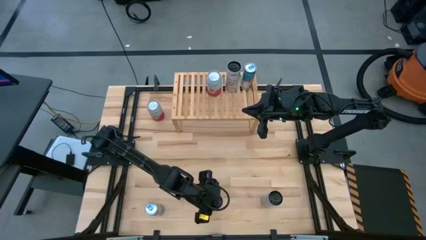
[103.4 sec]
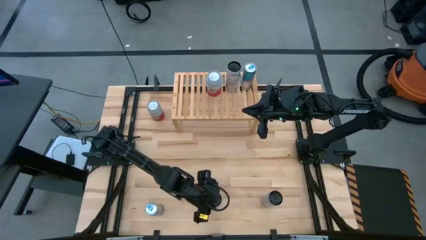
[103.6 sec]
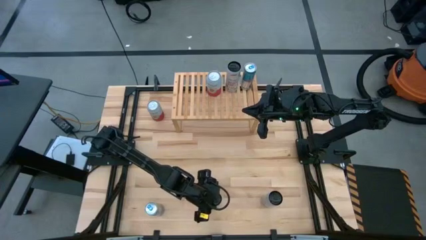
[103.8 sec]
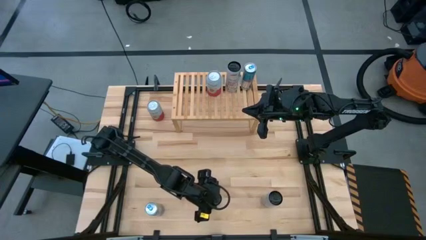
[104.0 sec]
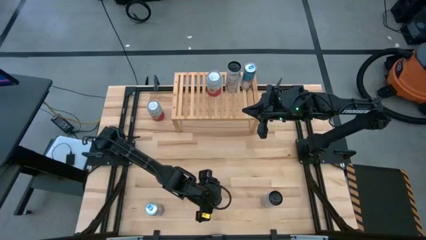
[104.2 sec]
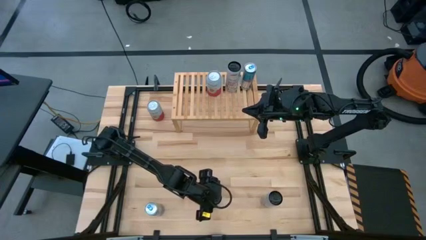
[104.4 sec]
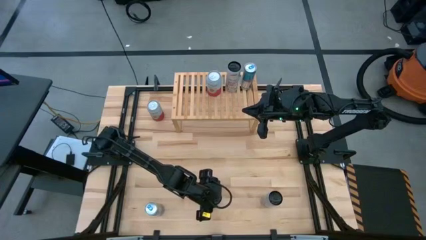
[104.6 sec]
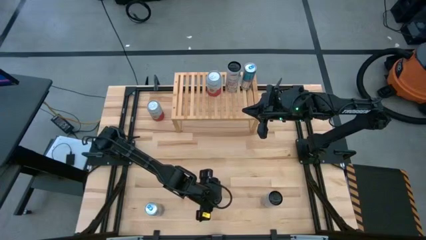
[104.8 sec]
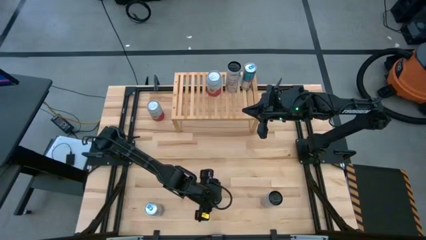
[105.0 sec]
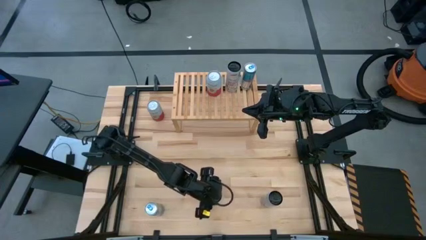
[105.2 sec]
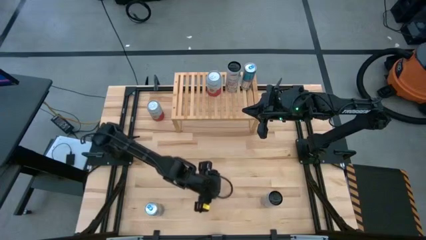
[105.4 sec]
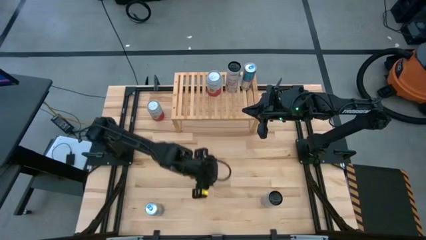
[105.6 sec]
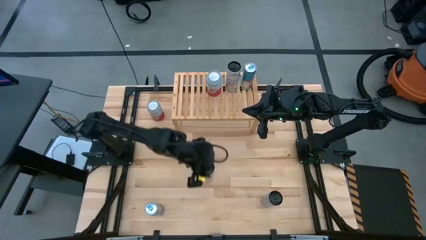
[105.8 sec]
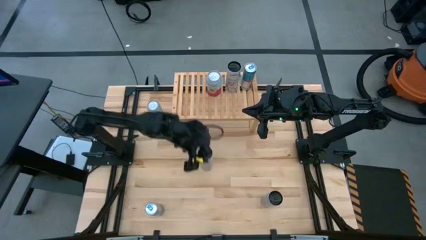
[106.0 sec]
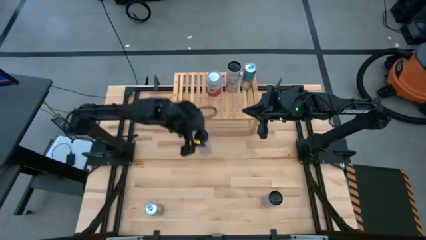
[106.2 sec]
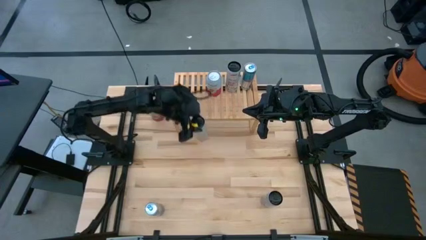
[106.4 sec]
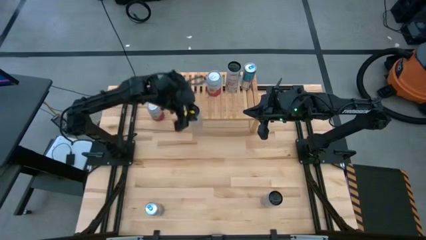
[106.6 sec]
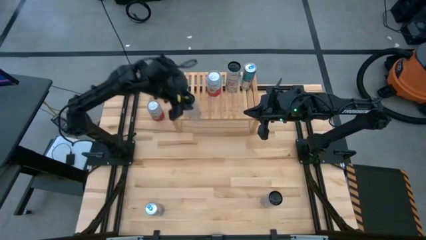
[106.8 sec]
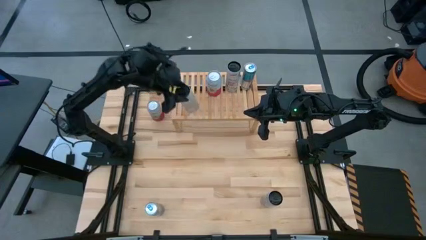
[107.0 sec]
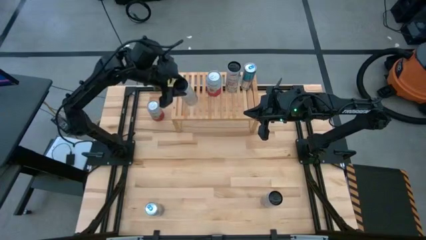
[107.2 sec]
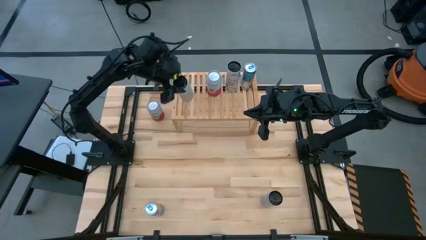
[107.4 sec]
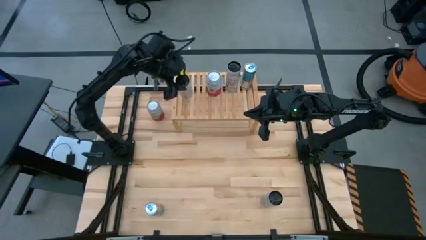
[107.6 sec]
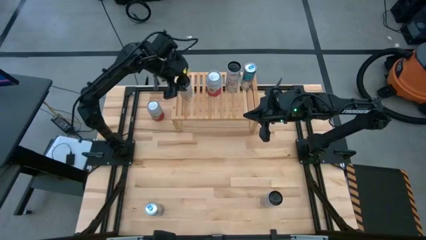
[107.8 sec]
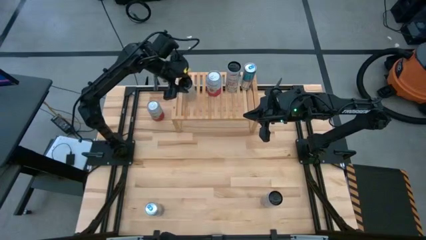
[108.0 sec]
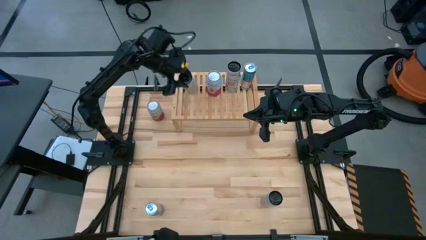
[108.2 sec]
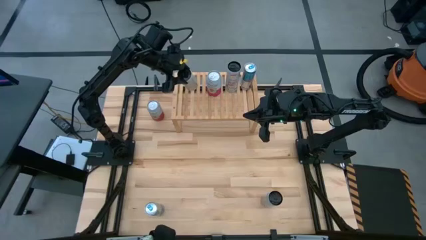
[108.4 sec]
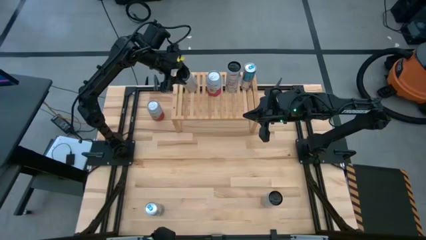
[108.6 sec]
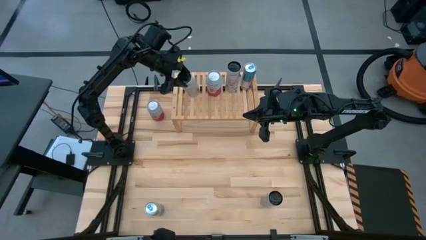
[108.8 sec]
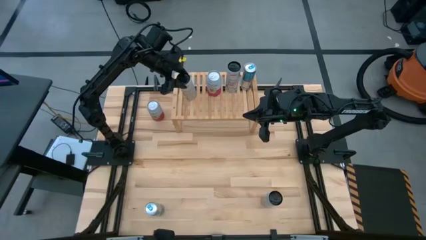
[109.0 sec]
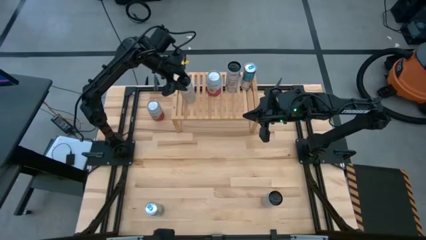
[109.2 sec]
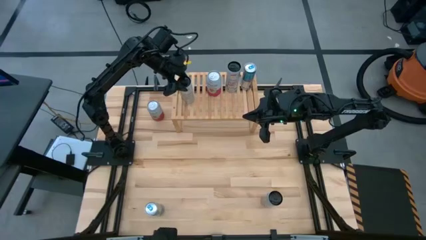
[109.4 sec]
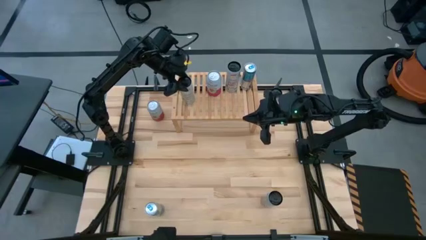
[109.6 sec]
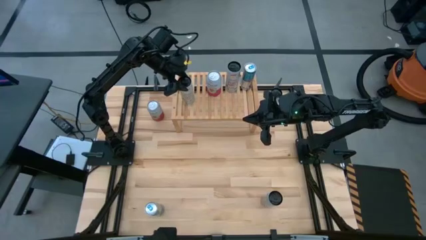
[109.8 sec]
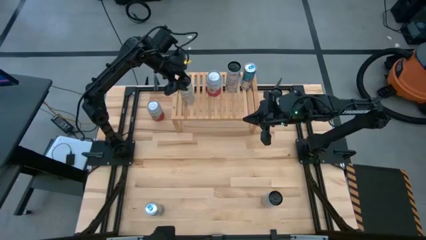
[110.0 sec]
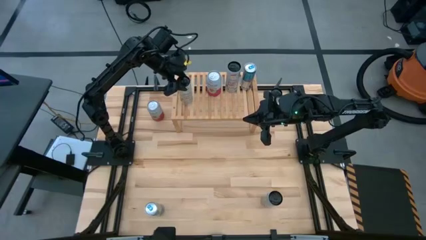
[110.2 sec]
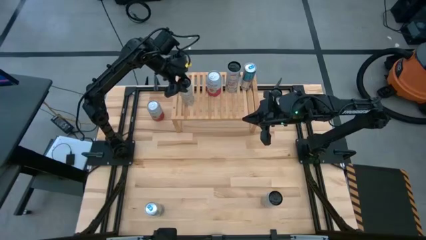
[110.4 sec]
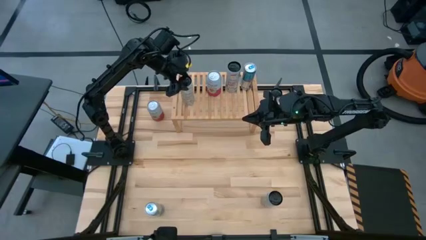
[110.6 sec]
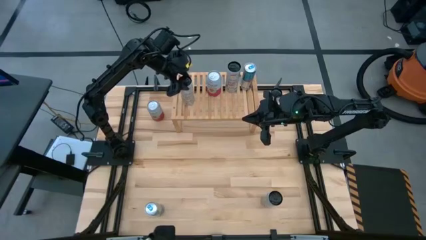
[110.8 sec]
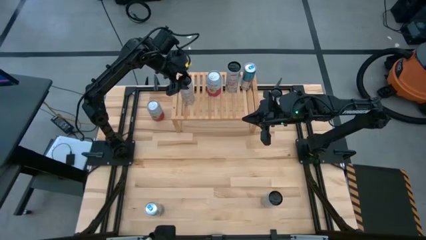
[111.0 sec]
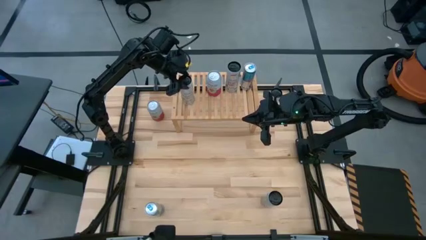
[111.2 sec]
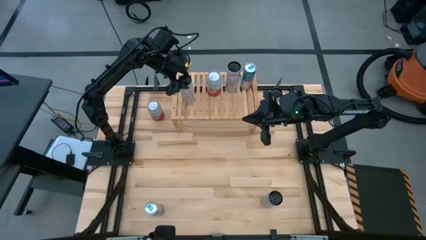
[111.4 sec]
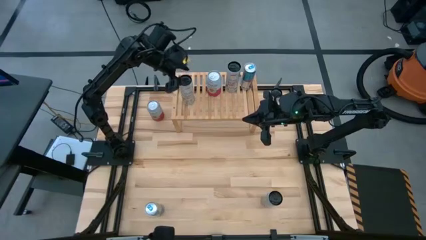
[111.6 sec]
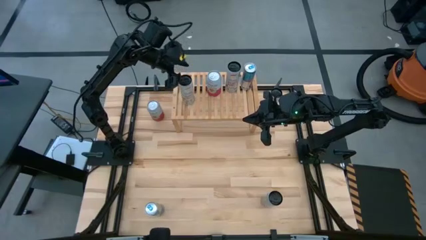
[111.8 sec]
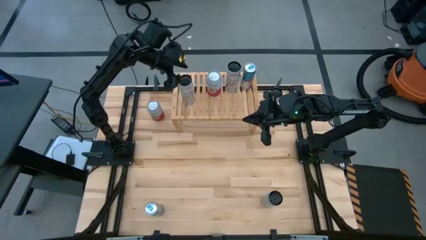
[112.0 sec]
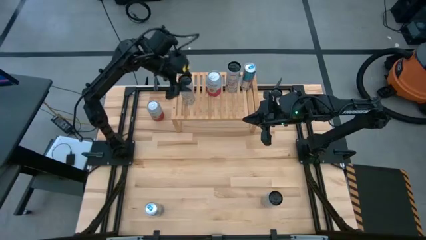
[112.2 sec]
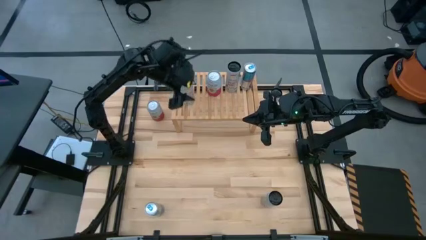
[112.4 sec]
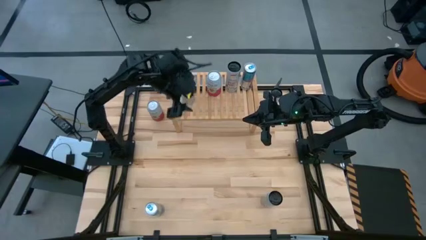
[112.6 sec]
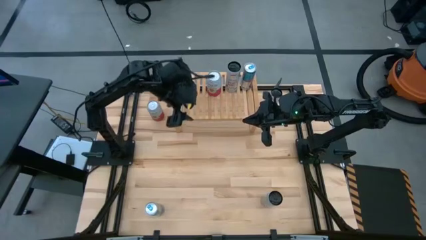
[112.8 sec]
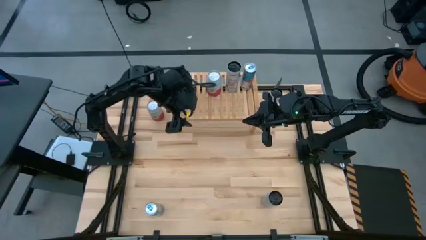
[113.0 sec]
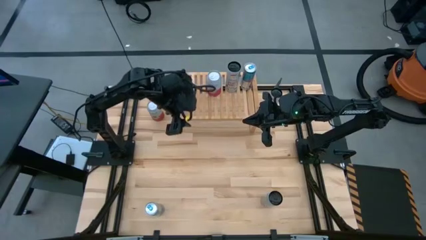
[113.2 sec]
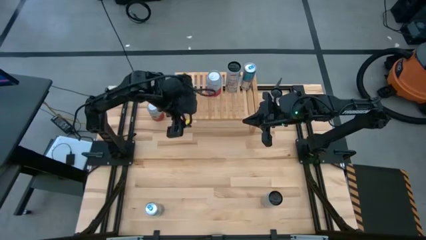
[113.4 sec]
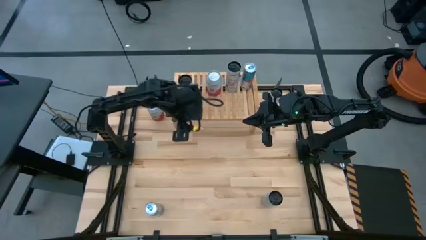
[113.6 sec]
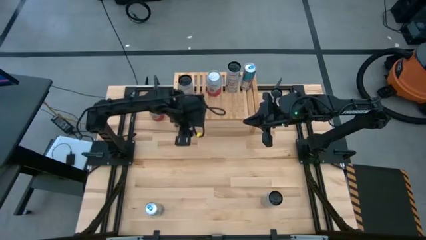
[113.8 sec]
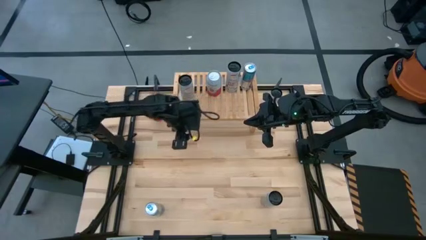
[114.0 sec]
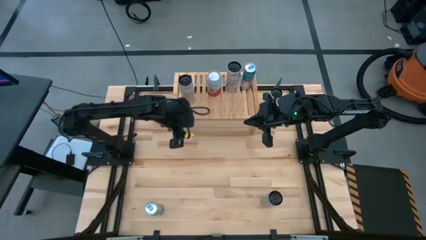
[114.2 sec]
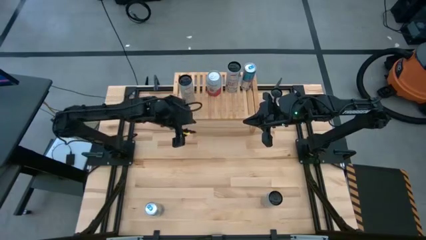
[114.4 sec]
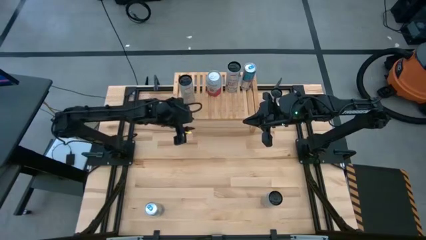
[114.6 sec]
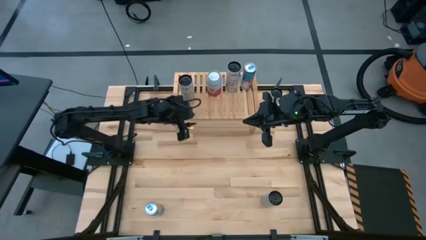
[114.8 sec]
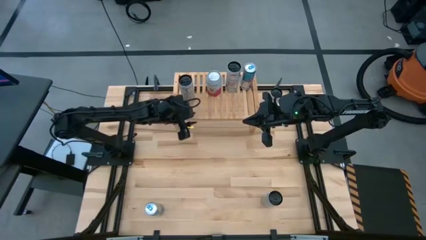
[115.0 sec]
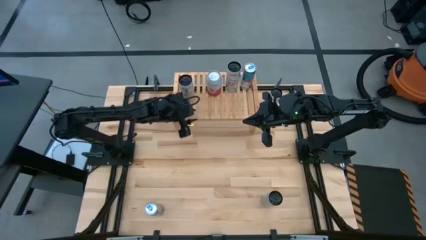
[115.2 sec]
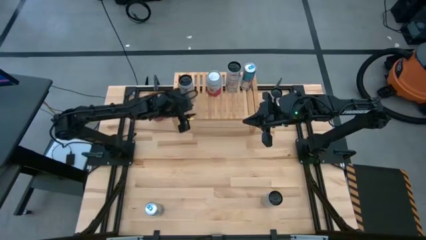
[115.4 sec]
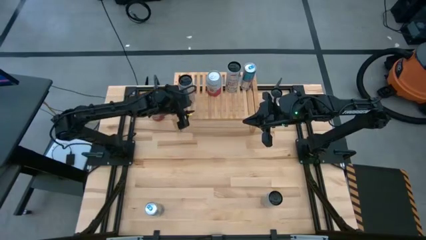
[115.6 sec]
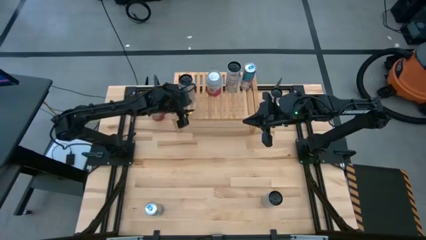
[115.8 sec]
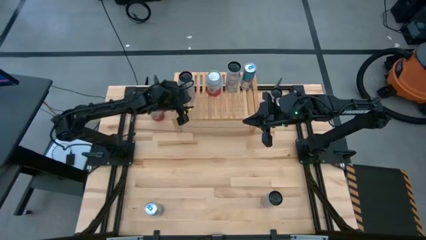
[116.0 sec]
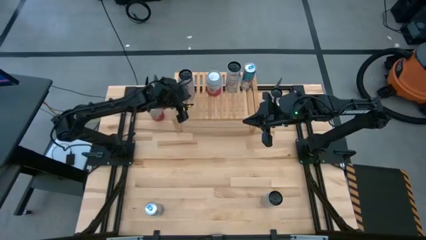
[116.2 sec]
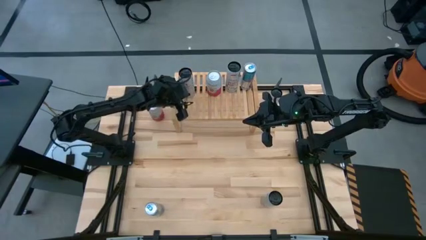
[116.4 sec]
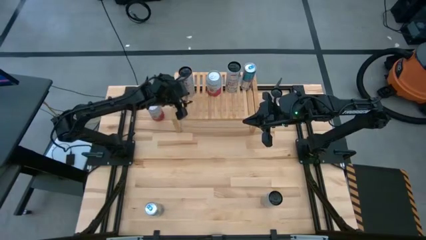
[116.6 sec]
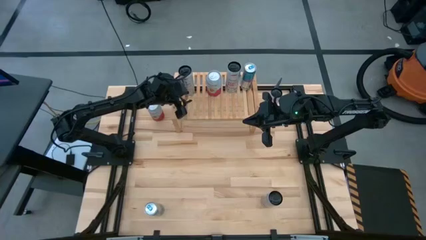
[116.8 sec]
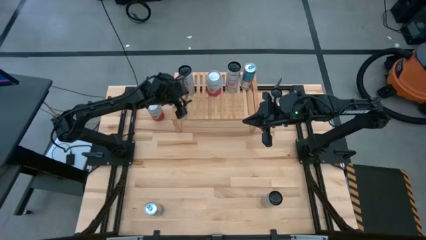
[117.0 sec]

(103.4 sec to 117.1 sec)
Task: Place canned beverage on shelf
Put the bottom white yellow soda can on the shelf
